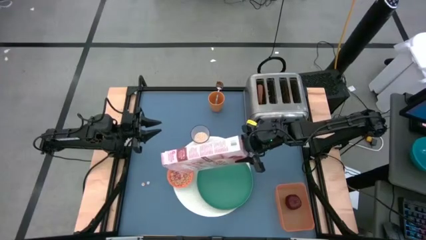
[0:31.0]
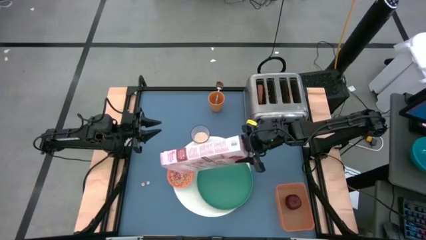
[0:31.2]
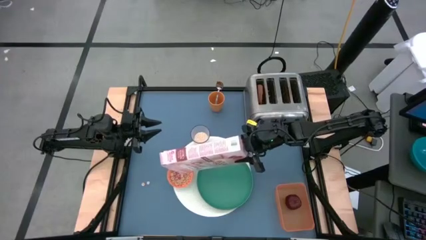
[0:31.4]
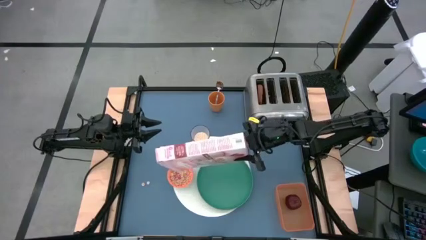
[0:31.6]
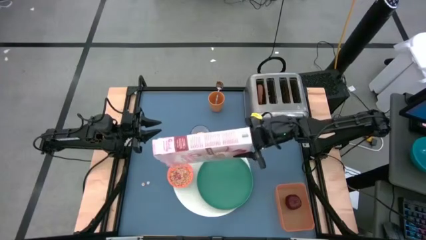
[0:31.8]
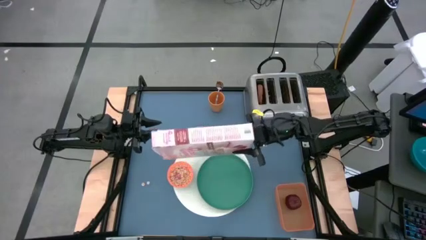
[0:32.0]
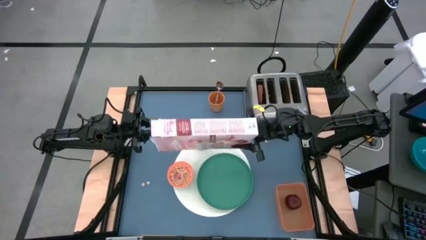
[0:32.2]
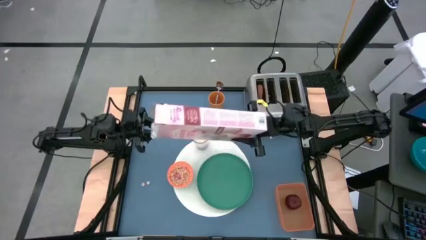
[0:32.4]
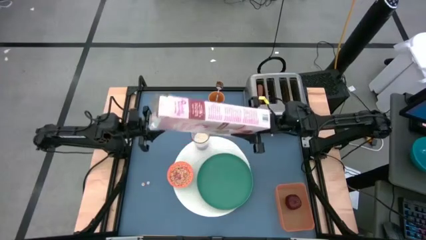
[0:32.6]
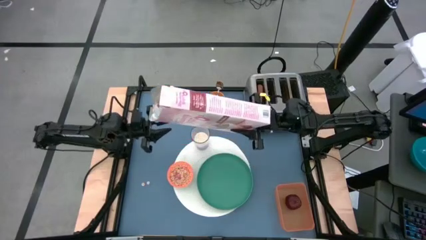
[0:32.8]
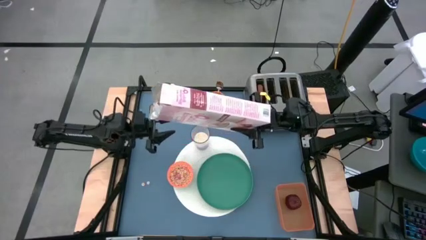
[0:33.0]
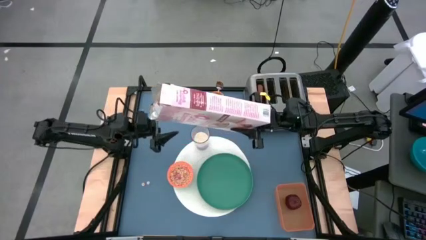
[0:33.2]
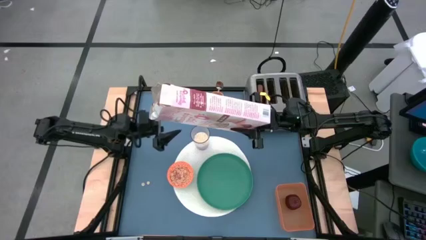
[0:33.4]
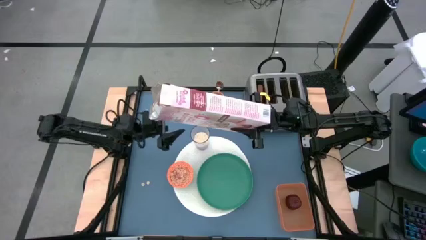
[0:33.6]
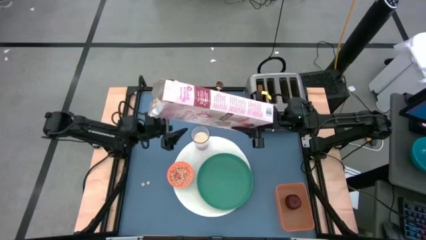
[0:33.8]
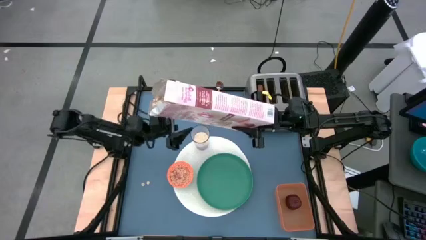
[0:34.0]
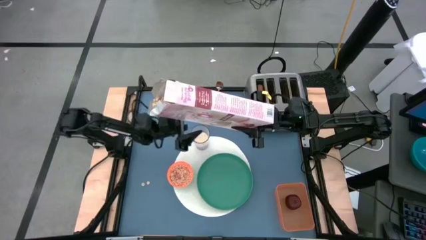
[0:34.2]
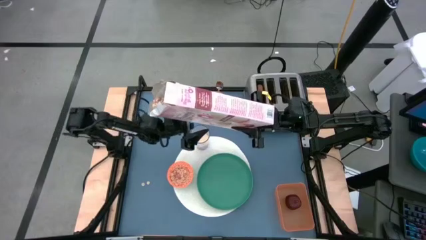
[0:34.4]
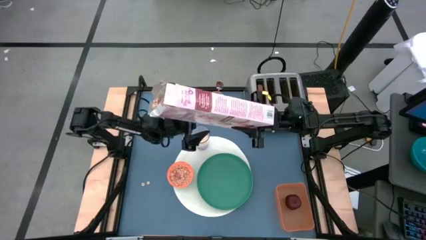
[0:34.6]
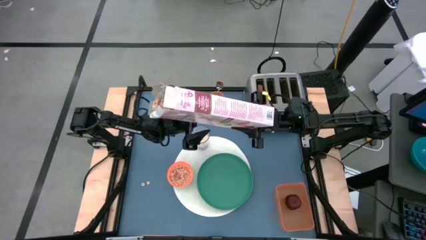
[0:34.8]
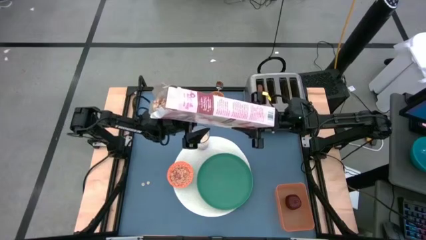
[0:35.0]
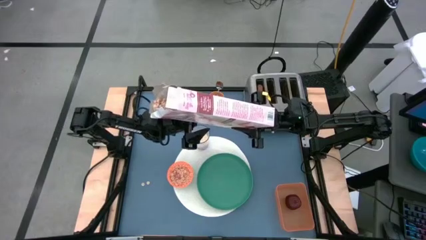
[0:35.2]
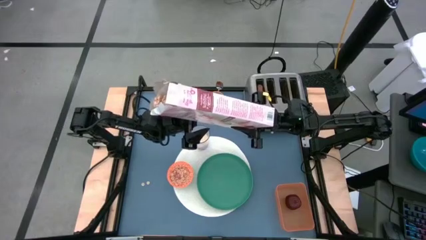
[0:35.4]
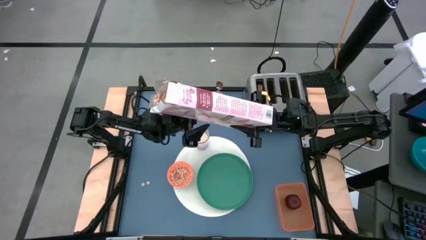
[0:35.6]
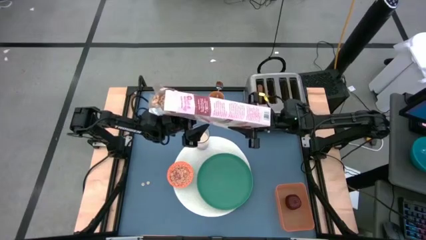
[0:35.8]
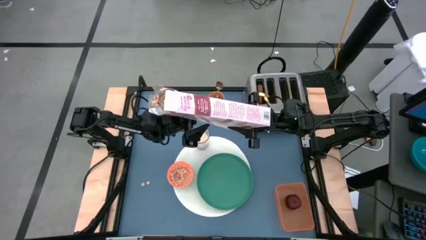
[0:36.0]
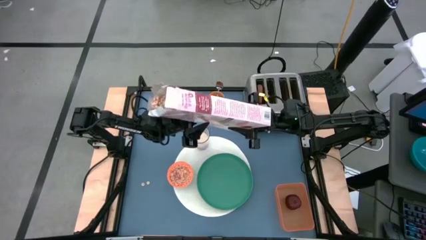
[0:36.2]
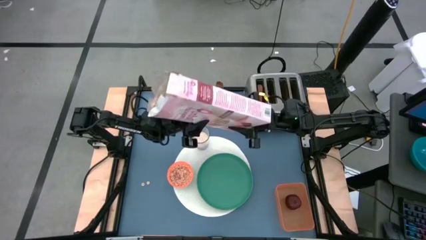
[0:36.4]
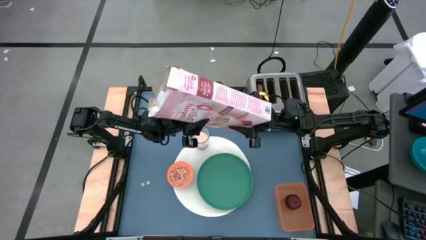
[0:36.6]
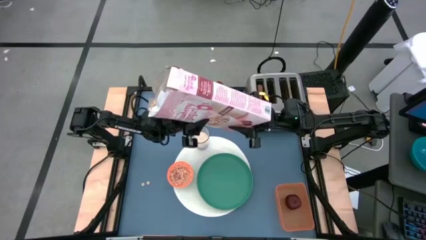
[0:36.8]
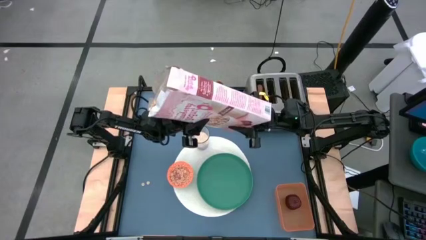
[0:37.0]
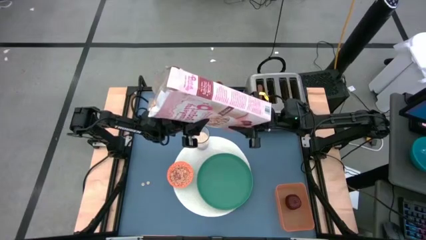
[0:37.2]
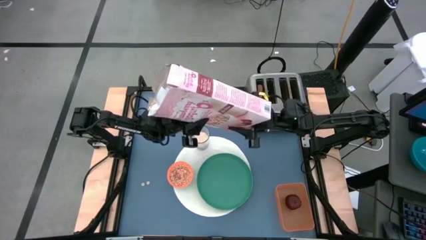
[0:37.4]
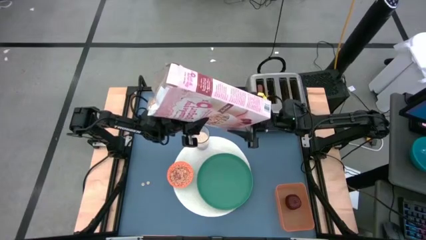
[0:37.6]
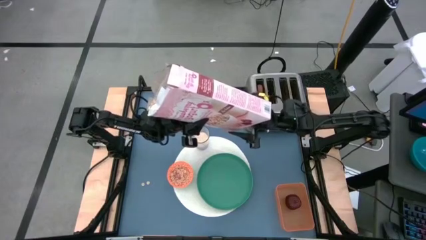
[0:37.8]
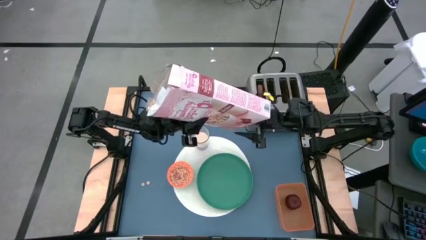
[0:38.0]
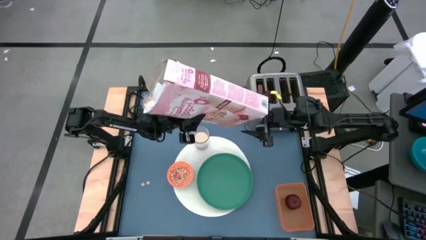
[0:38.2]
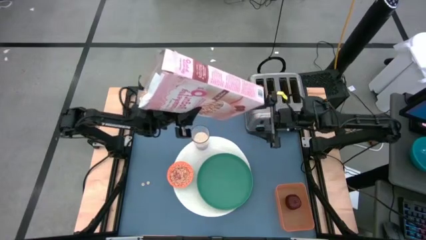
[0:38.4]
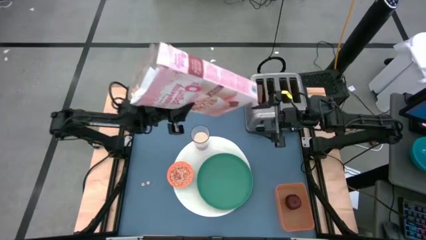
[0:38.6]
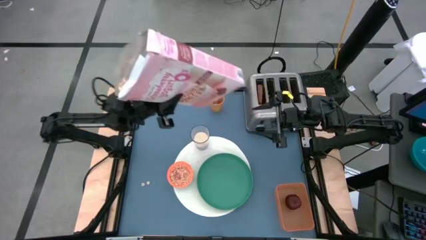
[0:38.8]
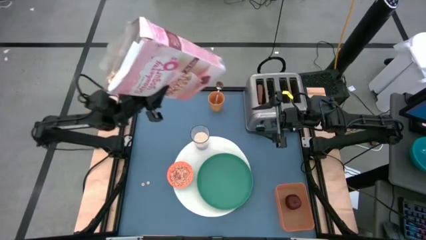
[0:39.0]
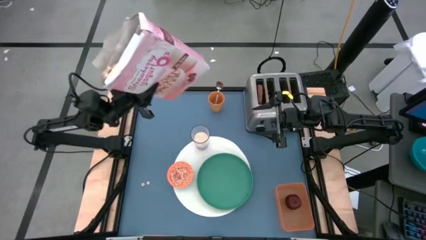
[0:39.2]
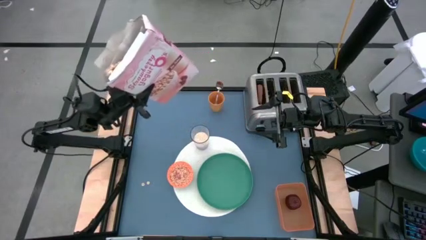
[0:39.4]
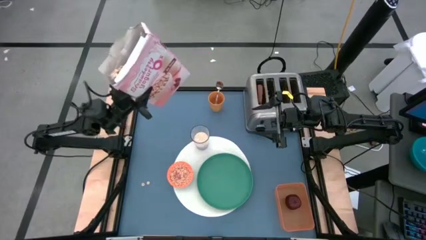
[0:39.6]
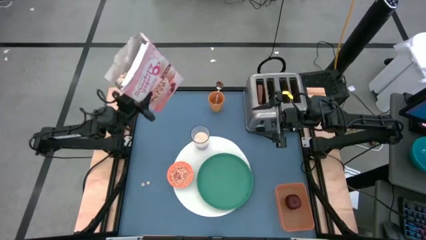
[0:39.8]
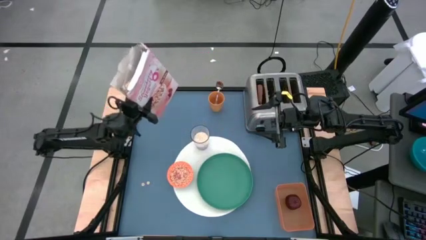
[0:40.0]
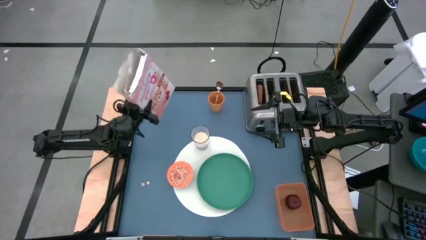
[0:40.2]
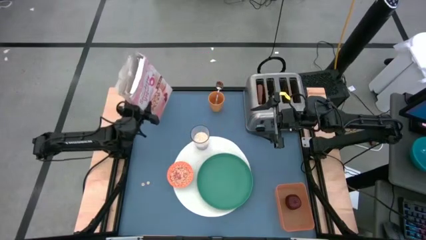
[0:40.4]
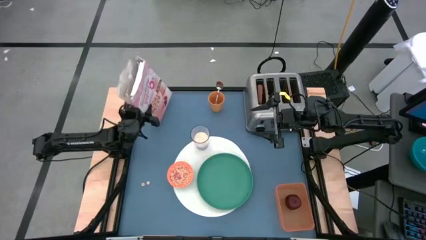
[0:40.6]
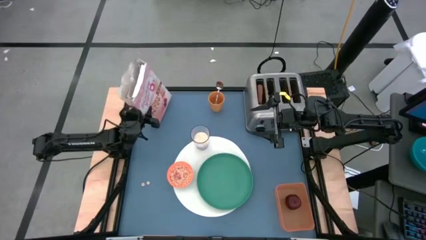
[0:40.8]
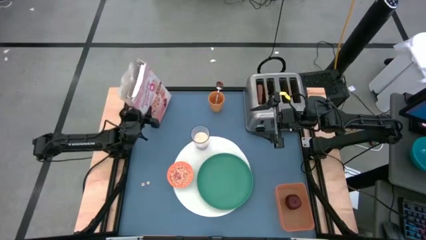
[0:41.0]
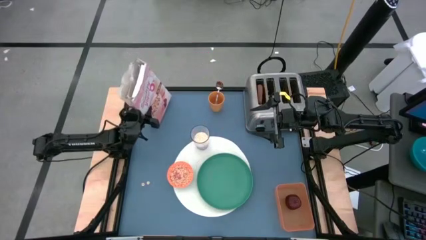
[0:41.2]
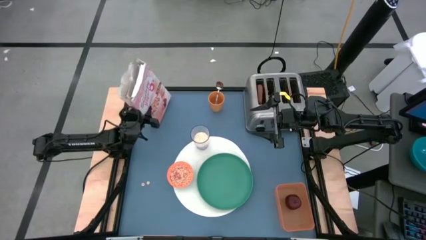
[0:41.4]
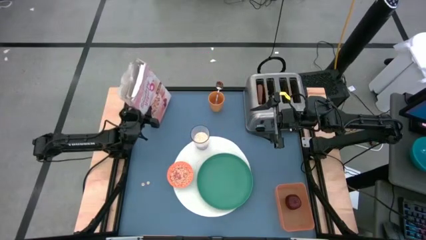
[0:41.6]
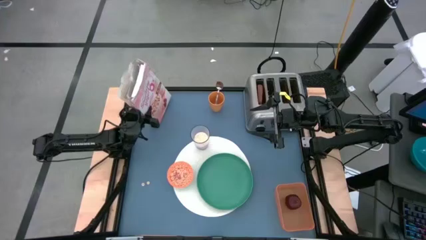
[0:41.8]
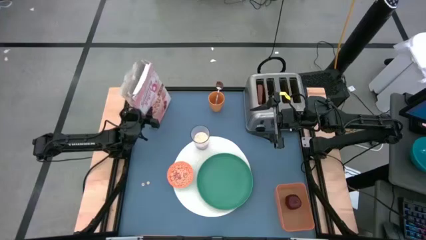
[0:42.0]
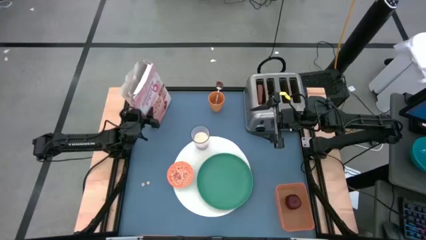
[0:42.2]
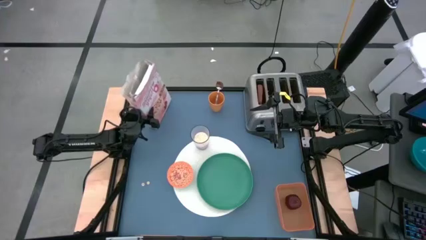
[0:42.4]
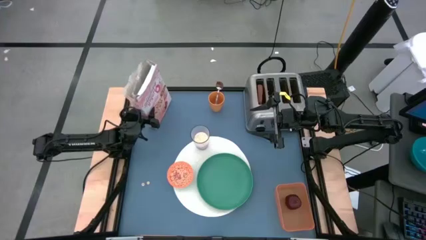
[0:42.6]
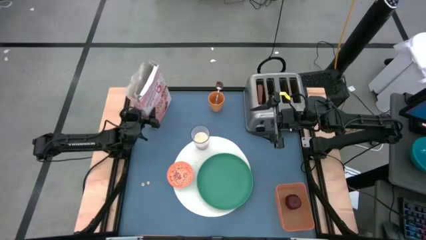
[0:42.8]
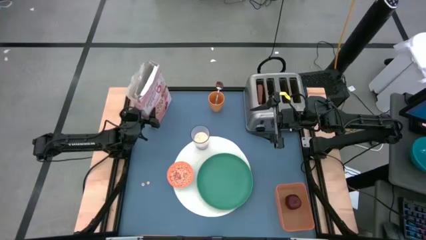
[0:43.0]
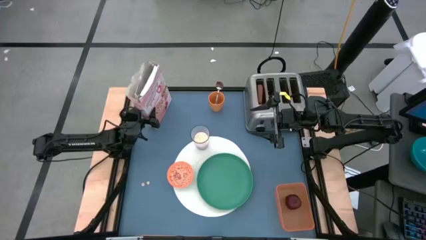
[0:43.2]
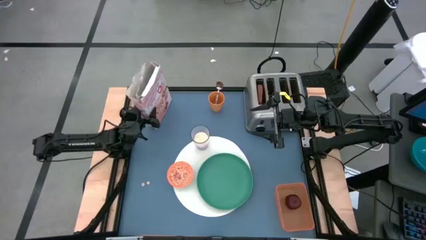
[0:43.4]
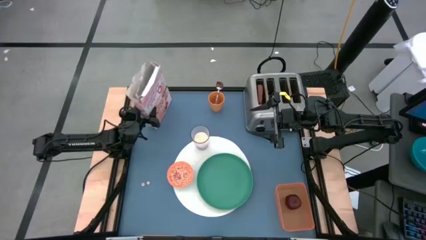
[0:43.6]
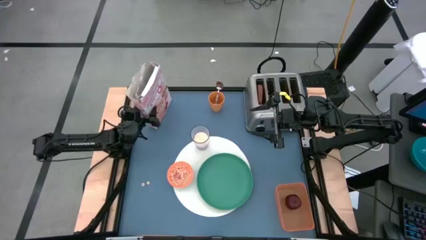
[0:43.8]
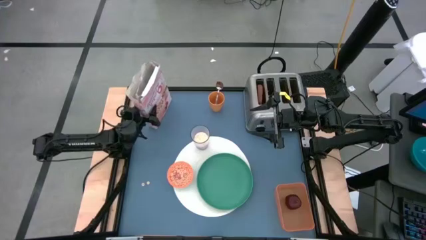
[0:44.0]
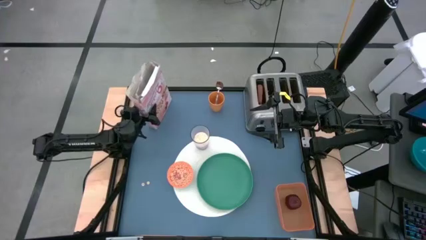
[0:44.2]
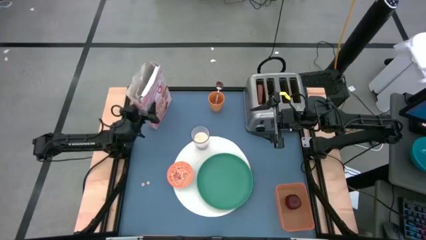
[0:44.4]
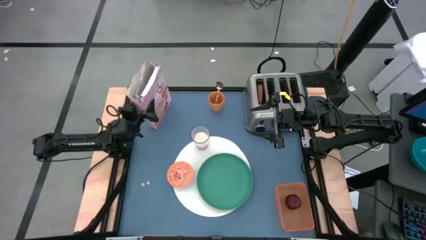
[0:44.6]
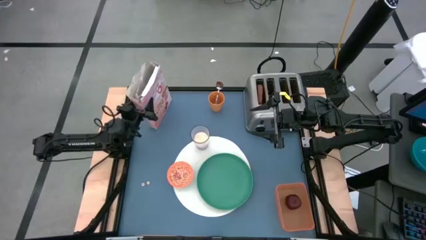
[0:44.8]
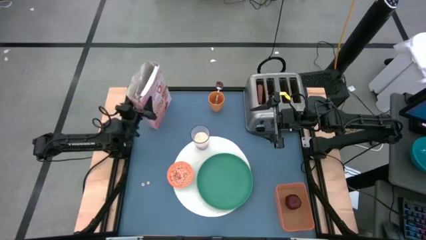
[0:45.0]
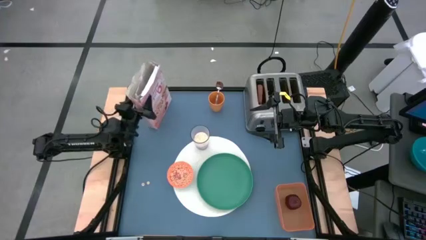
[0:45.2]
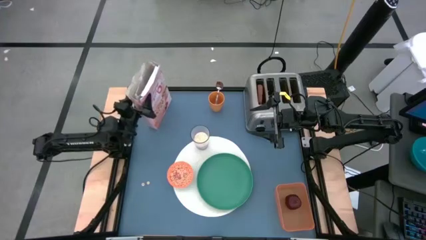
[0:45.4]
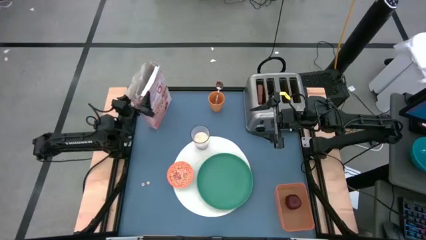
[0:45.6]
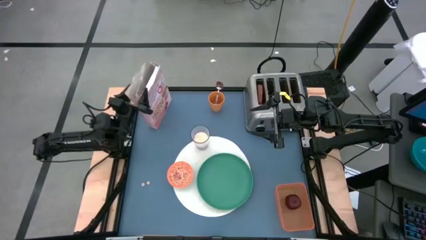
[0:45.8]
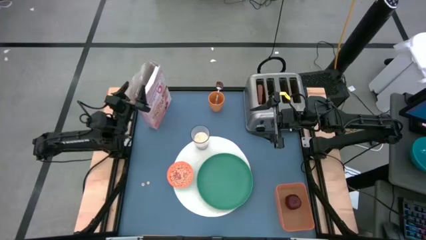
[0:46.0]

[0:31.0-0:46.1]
Task: Arrange a breakfast setting
Pour the cereal from the cereal box into the orange bowl

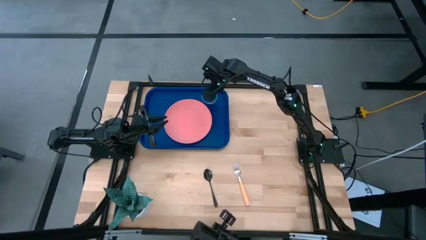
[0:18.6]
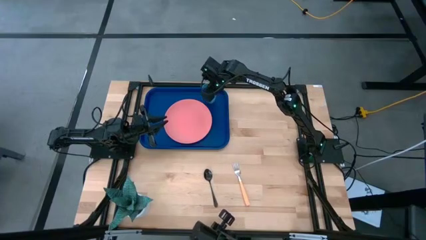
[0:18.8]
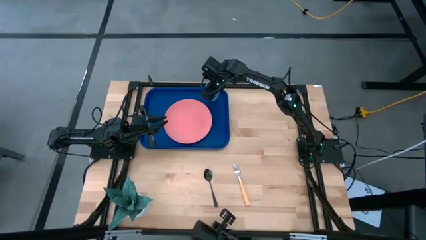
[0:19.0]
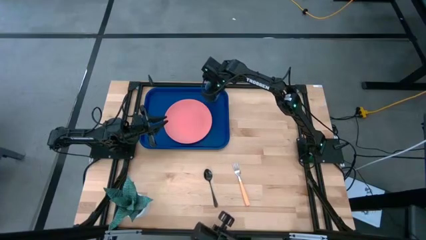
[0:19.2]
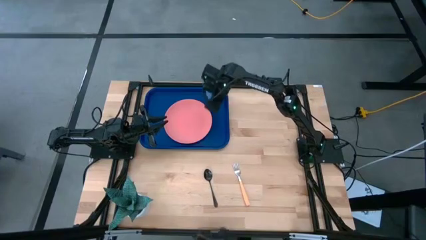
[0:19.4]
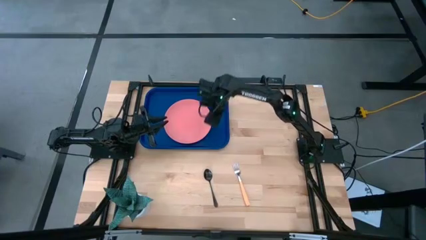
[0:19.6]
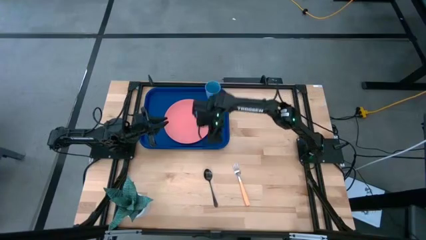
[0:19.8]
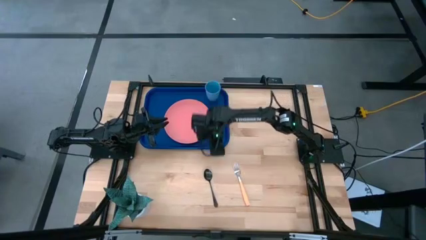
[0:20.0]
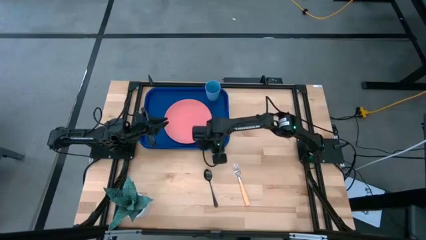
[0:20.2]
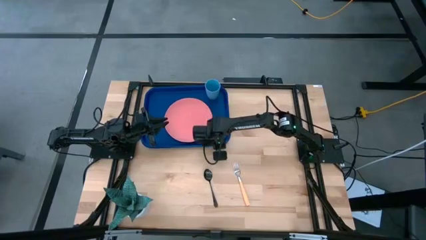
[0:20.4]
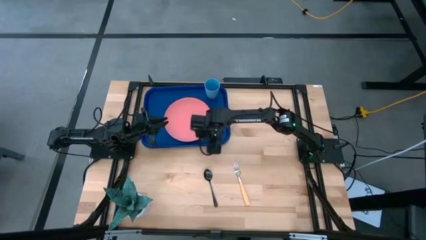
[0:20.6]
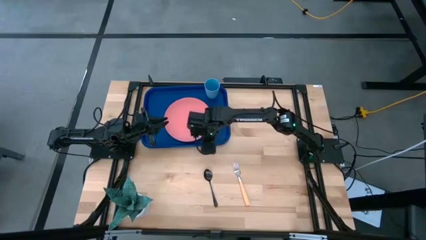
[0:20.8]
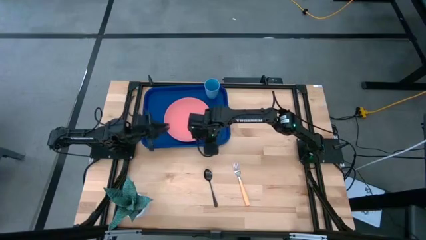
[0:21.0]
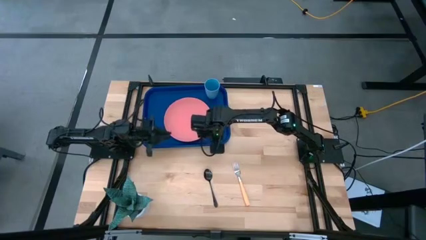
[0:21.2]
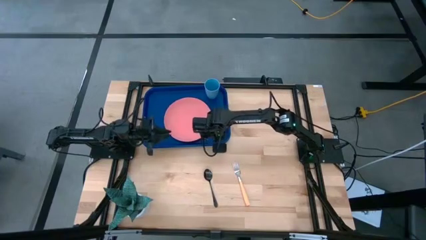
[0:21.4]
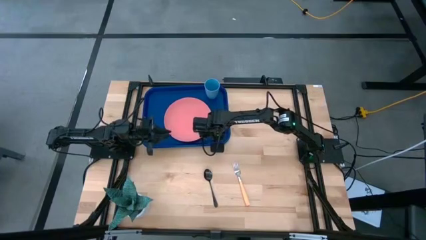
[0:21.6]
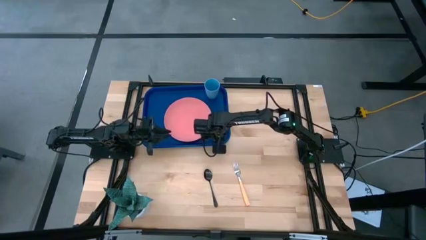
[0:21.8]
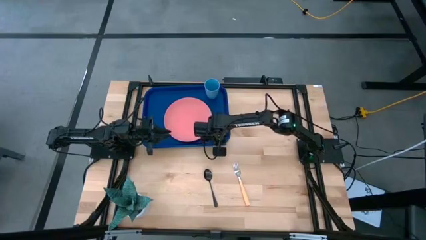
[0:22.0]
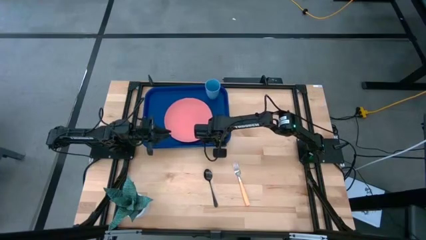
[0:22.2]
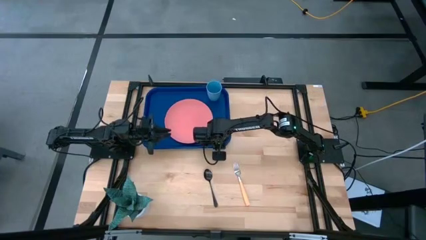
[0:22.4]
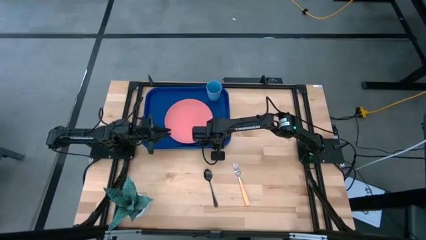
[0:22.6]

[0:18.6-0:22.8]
Task: Pick and place plate/cup/fork/spoon on tray
Adjust the serving tray
